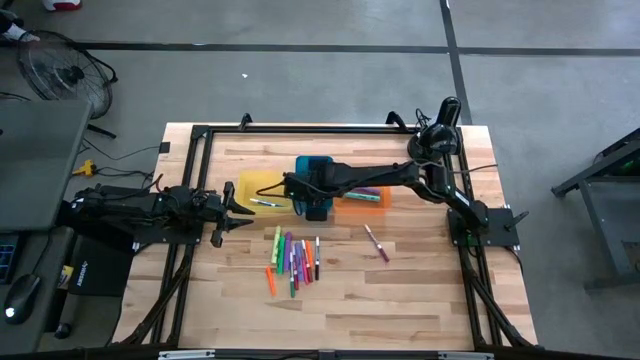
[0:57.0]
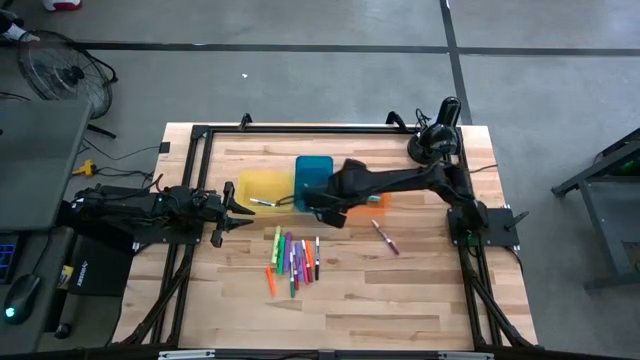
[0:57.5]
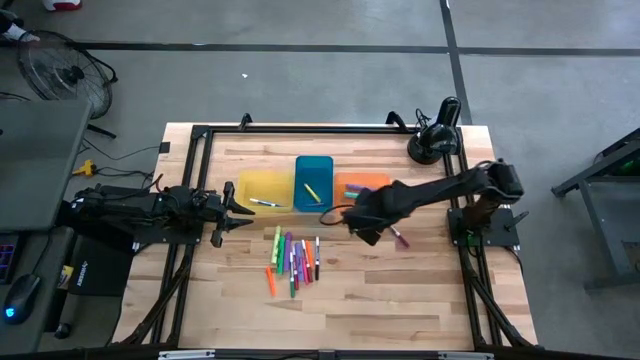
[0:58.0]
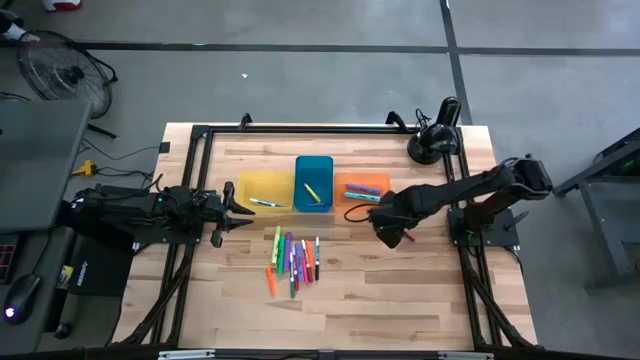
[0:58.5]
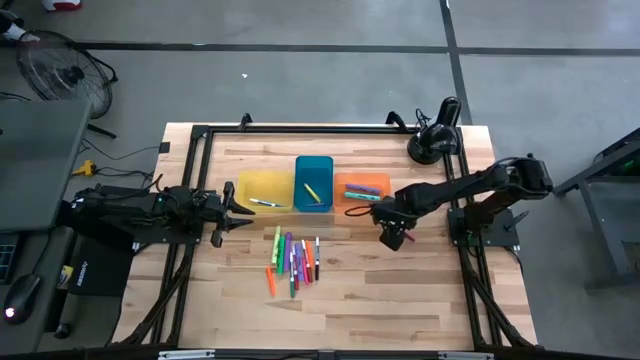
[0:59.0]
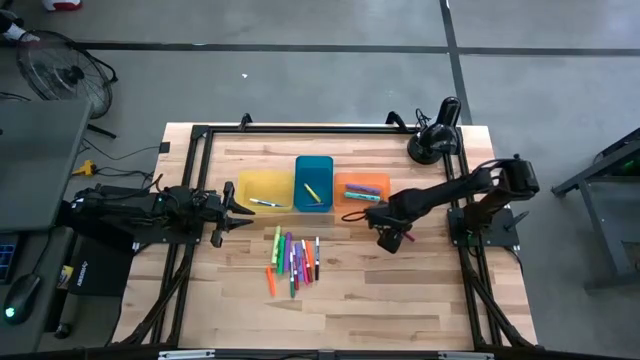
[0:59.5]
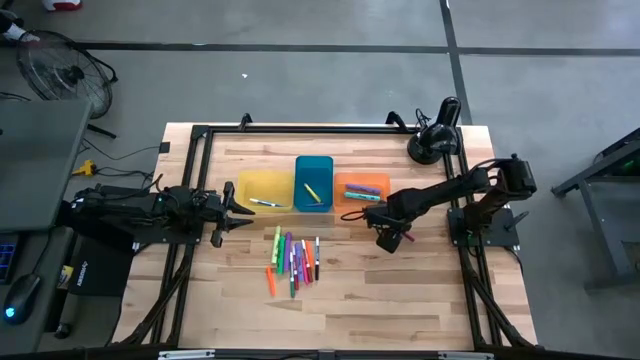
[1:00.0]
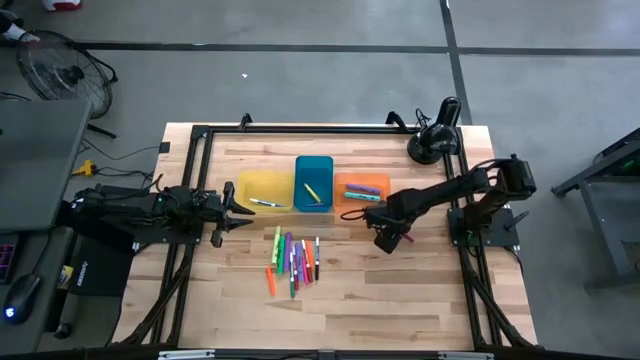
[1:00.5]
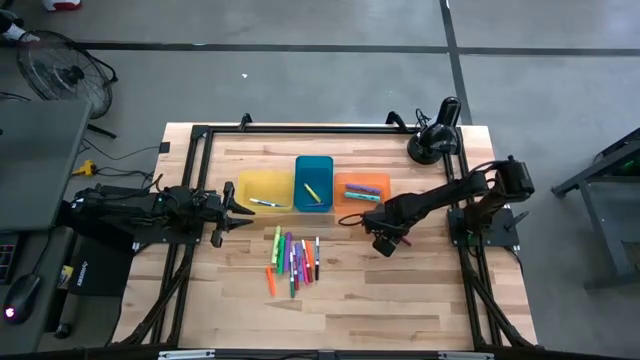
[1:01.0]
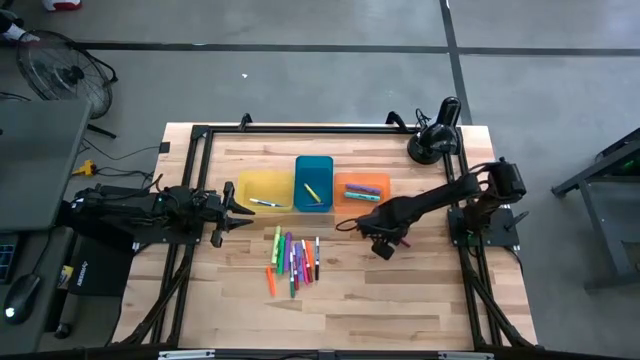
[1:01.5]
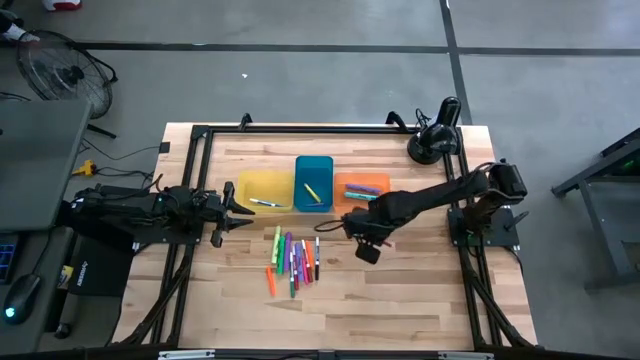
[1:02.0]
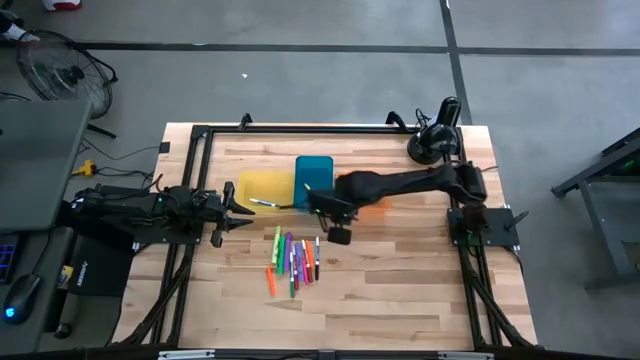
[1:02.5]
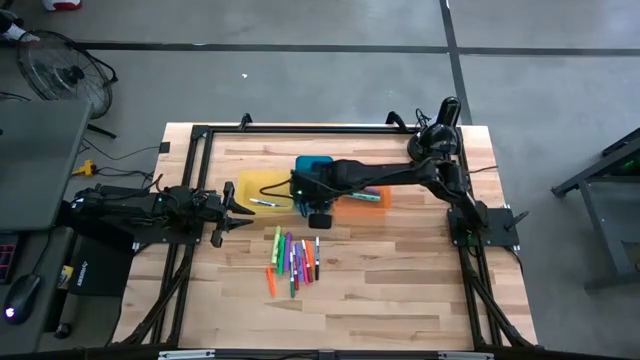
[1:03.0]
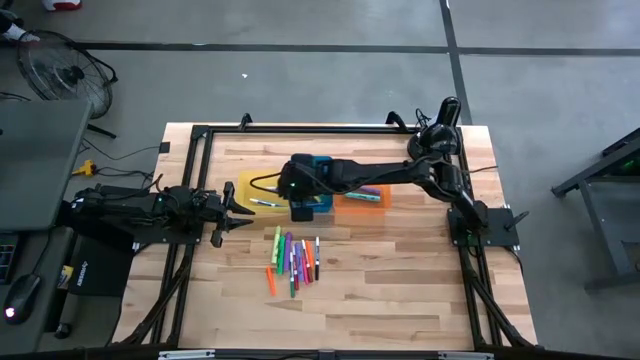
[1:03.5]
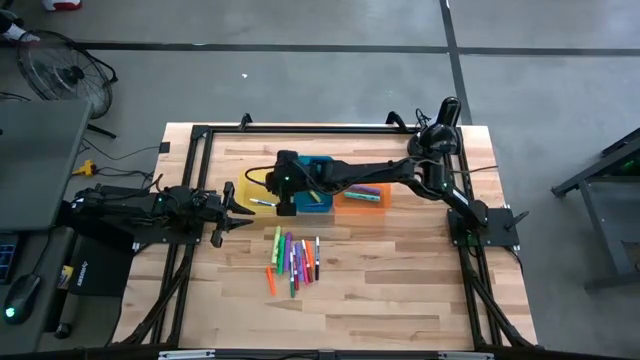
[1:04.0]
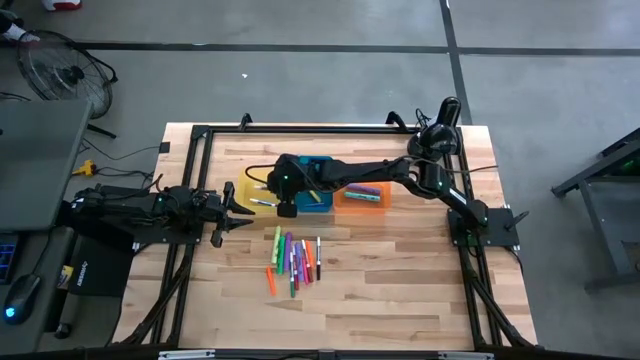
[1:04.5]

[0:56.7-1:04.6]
Task: Pick & Place Markers
Put the dark red dry erase marker into the yellow bin

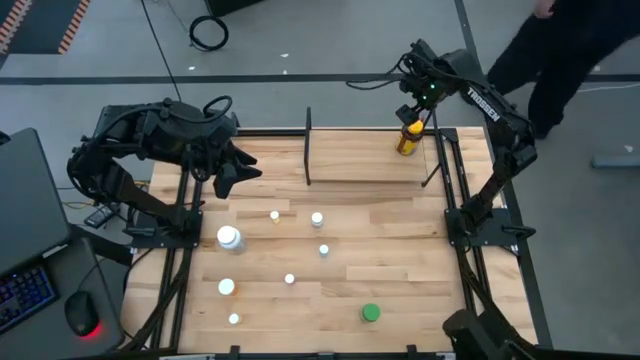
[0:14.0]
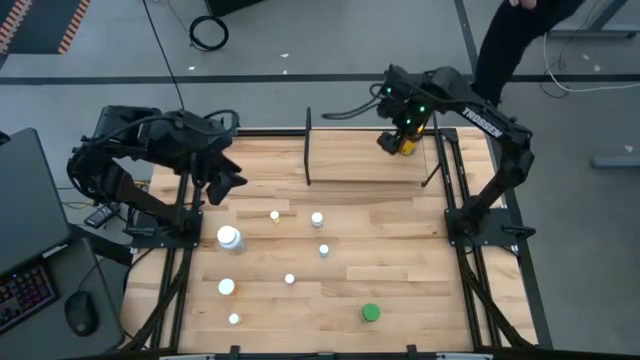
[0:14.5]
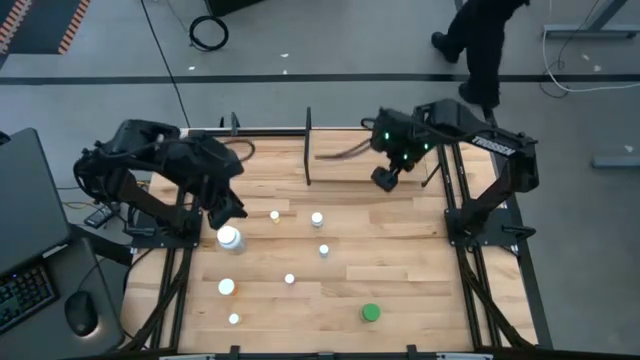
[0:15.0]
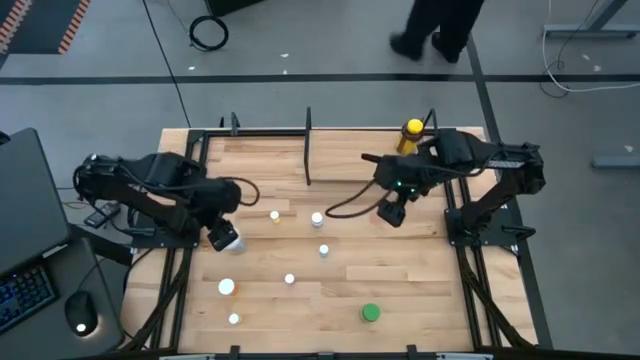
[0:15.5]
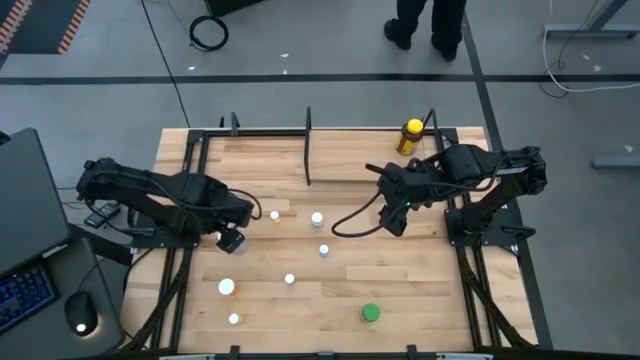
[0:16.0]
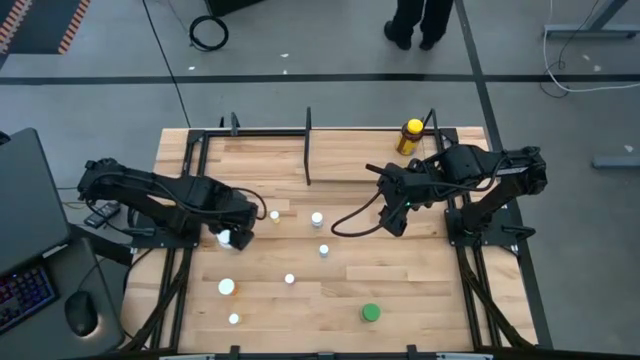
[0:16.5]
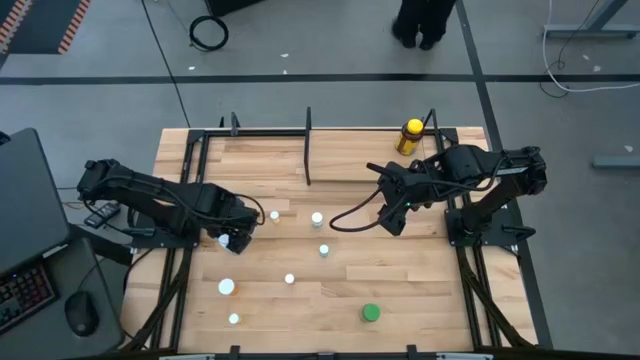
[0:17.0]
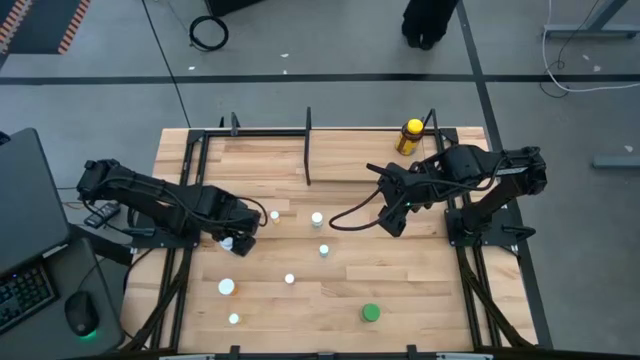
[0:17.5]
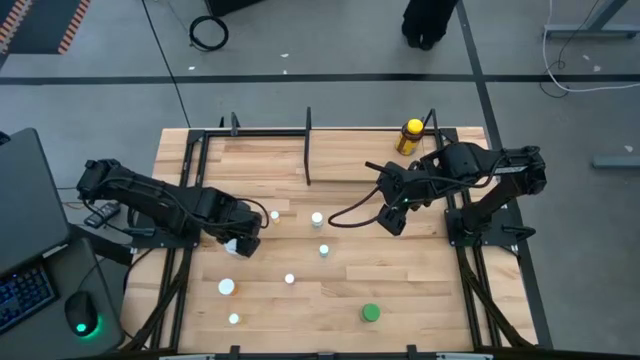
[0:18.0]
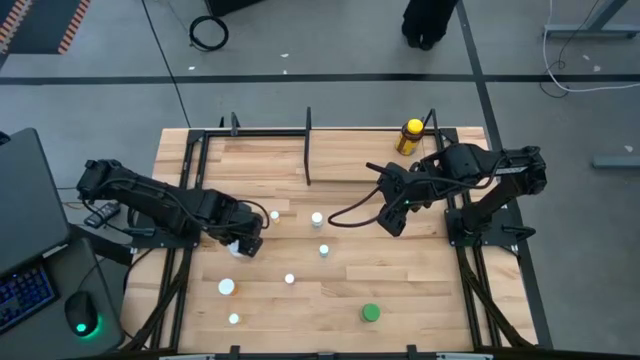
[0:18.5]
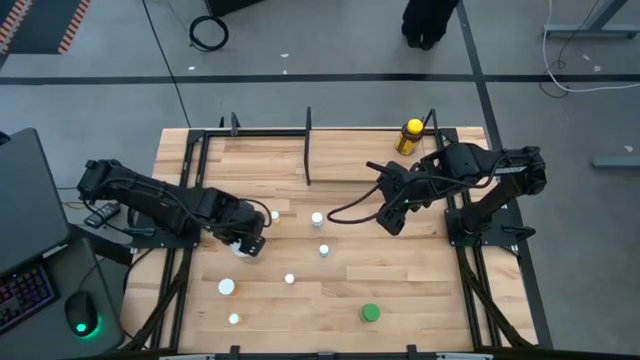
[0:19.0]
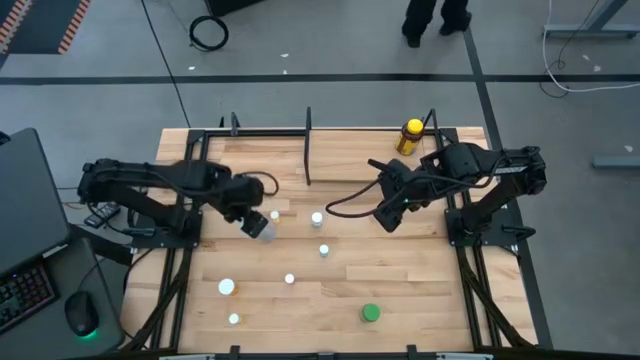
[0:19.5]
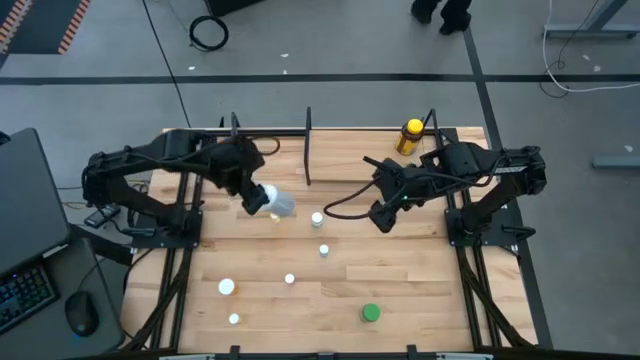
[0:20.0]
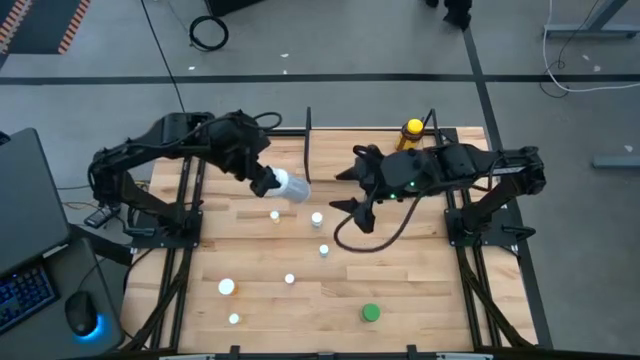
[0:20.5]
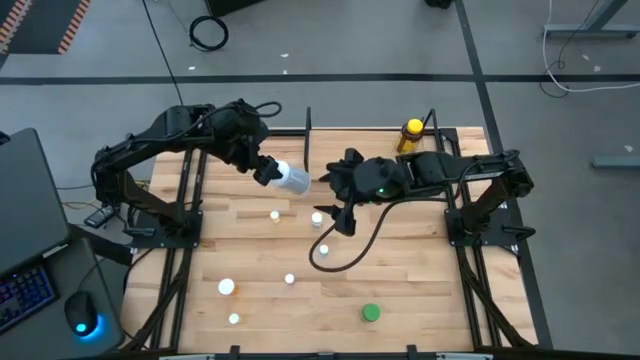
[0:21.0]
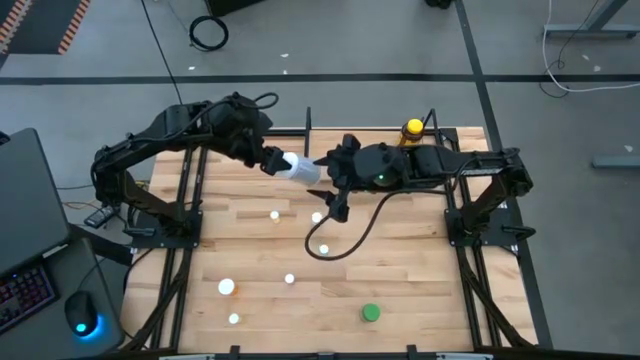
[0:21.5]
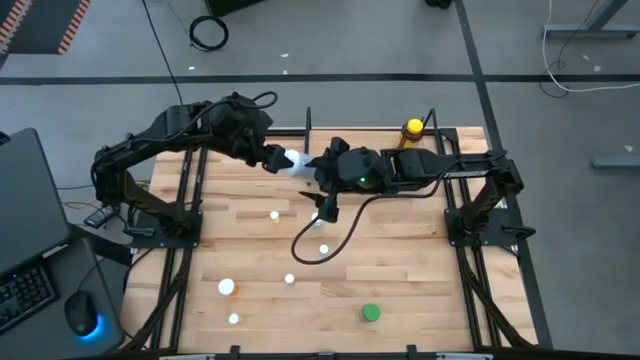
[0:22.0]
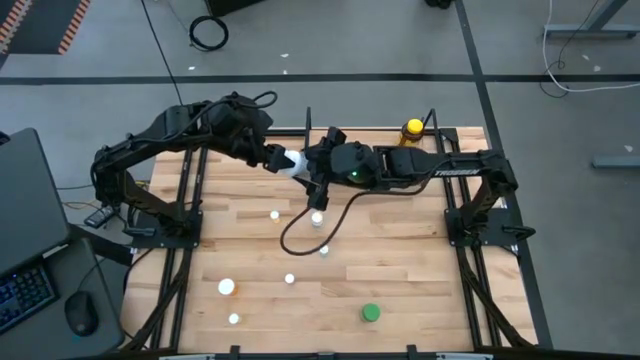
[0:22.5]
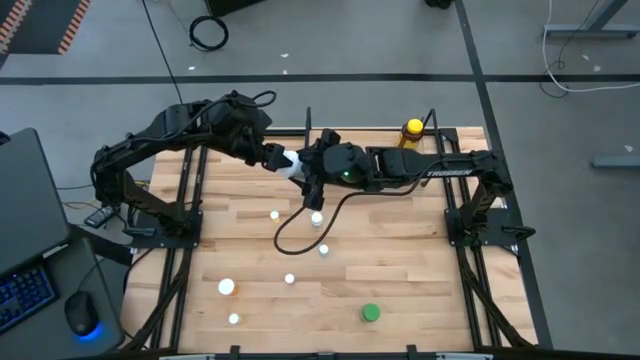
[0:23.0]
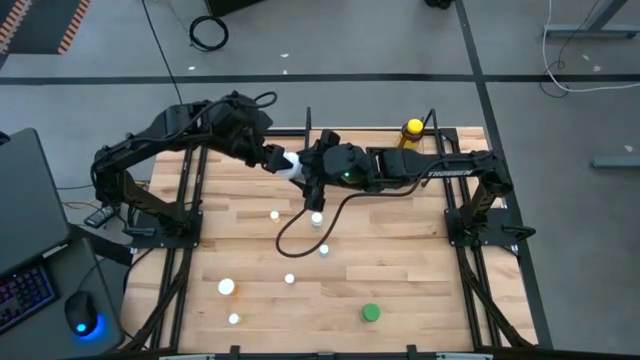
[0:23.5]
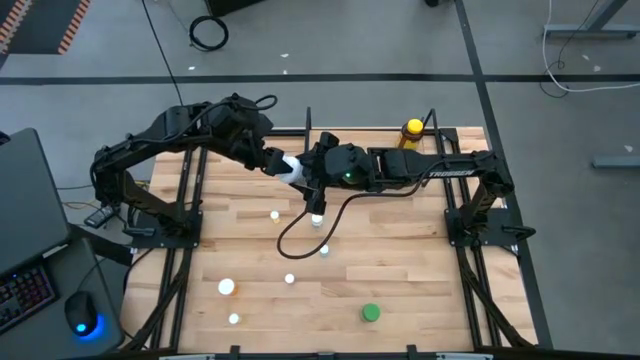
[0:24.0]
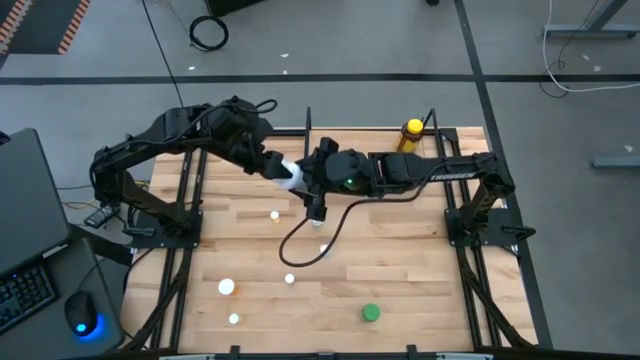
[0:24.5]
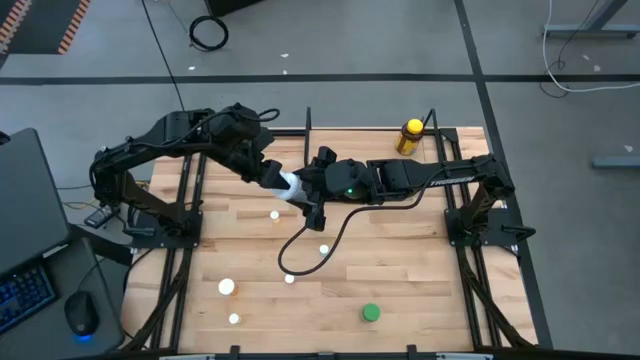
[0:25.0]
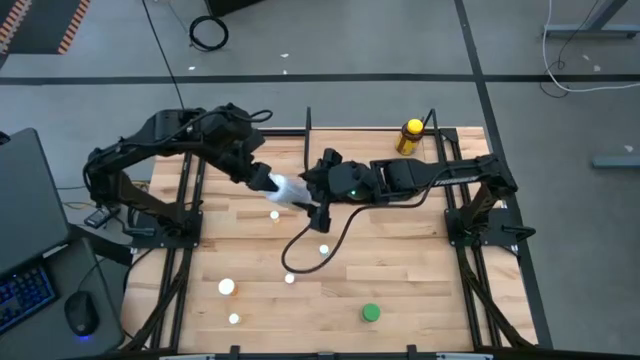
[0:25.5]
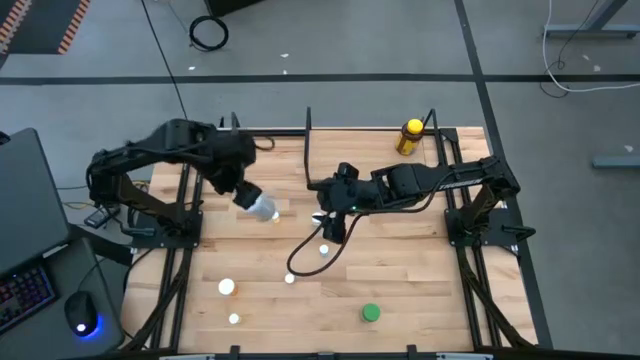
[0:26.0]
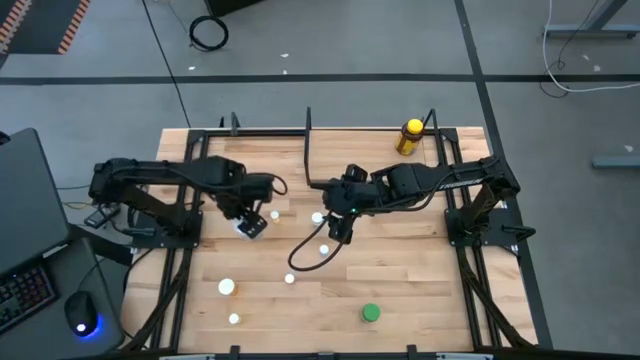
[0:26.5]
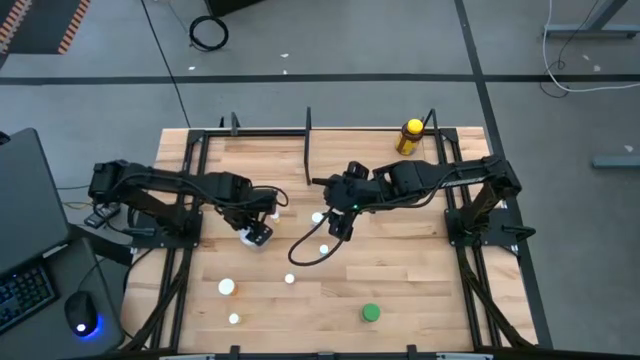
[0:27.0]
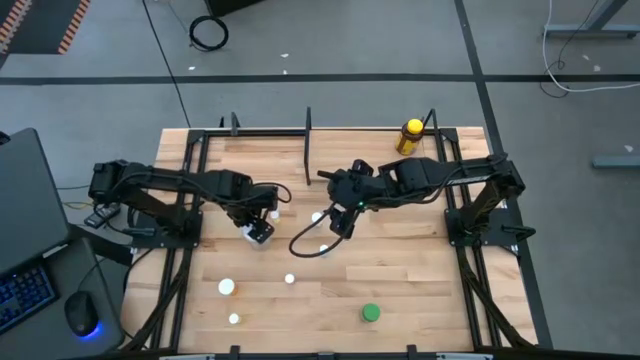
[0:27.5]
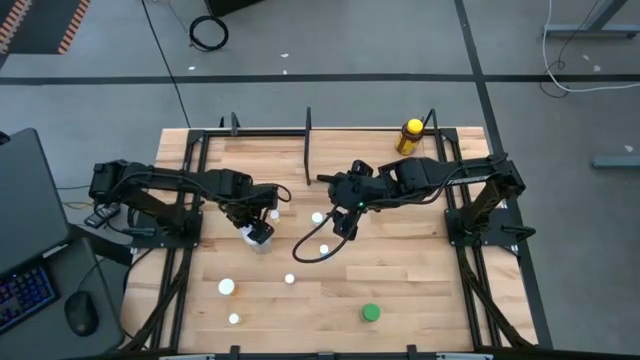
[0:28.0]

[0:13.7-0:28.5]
Task: Pick and place medicine bottles onto shelf by color
Put the large white pill bottle on the shelf
